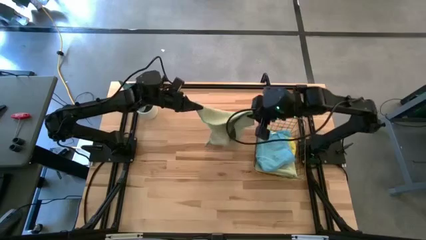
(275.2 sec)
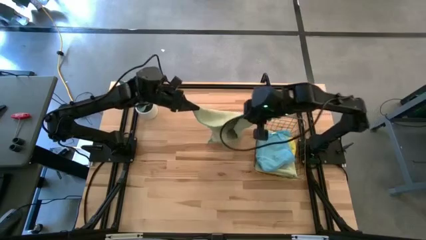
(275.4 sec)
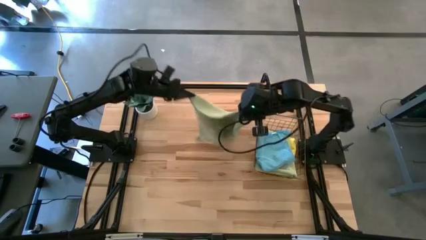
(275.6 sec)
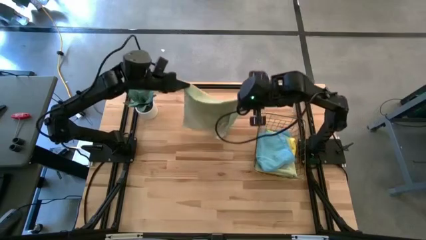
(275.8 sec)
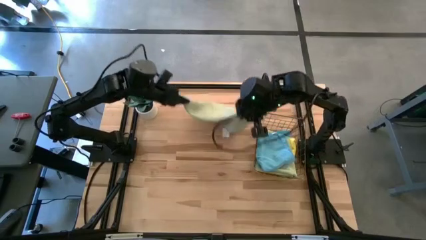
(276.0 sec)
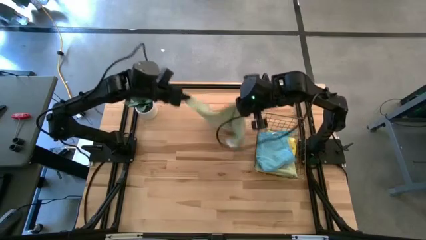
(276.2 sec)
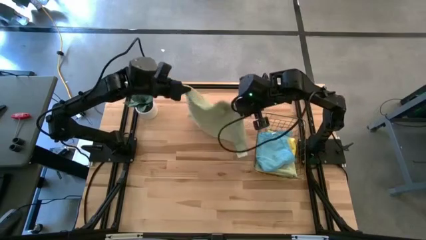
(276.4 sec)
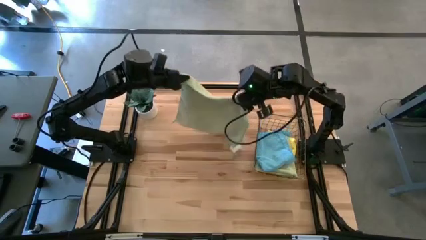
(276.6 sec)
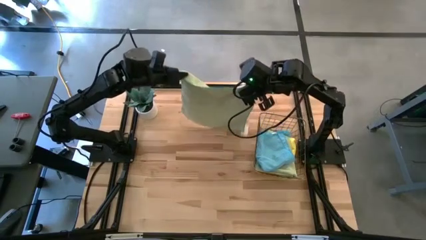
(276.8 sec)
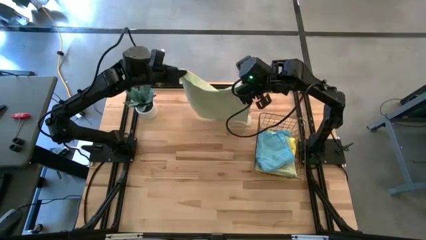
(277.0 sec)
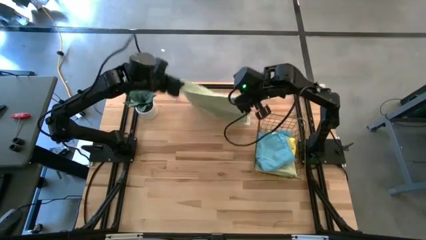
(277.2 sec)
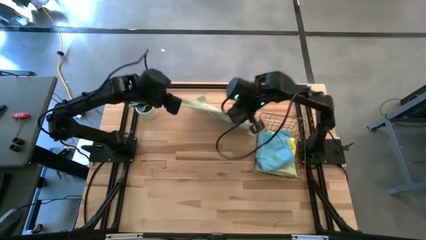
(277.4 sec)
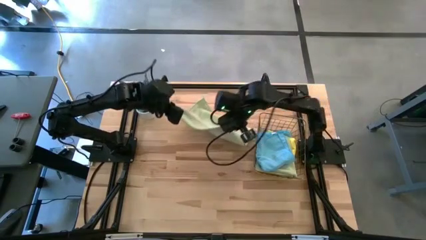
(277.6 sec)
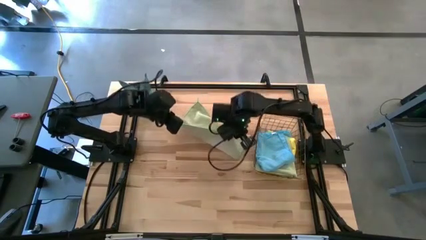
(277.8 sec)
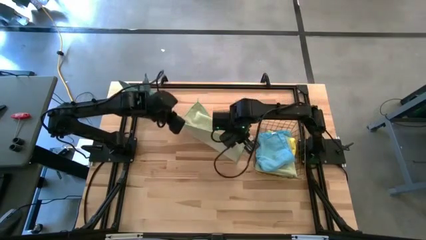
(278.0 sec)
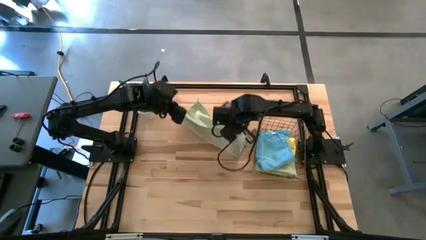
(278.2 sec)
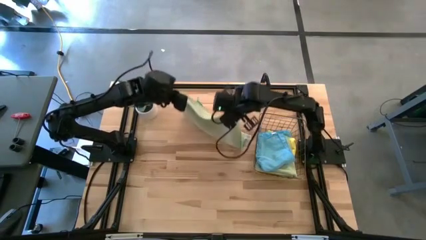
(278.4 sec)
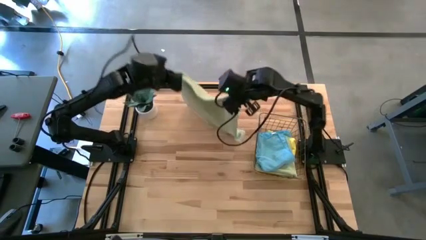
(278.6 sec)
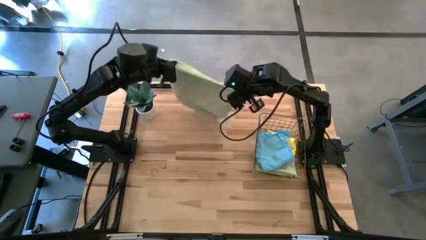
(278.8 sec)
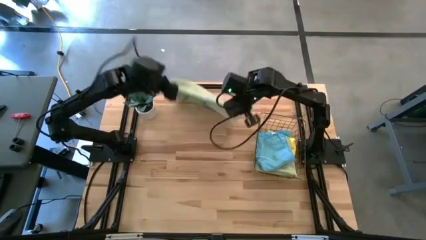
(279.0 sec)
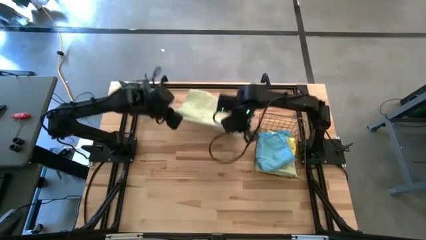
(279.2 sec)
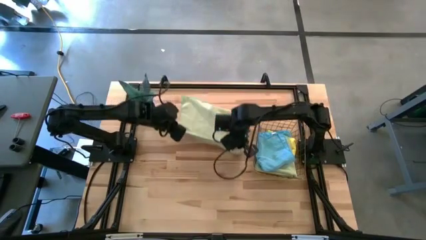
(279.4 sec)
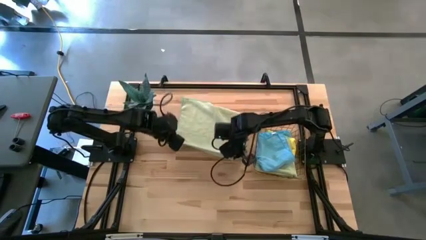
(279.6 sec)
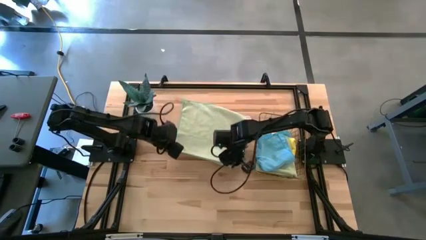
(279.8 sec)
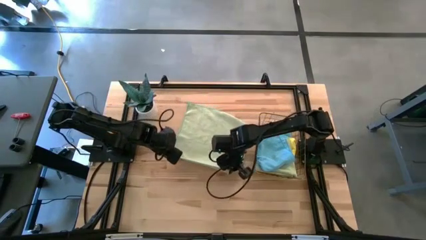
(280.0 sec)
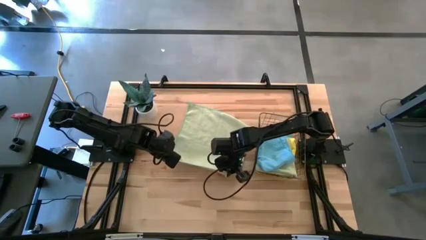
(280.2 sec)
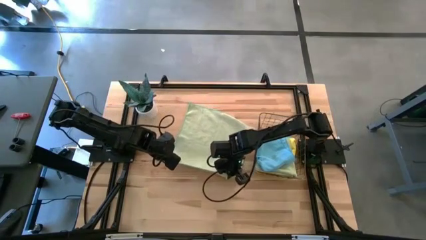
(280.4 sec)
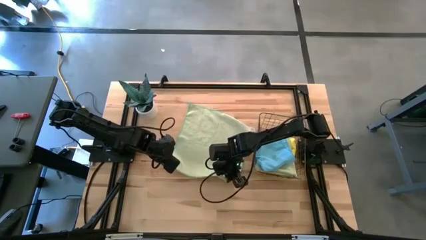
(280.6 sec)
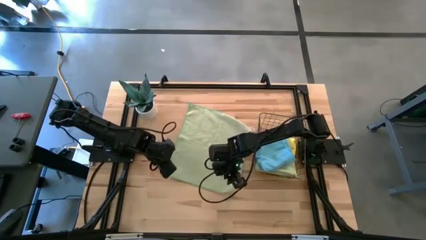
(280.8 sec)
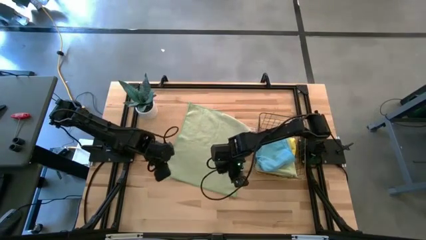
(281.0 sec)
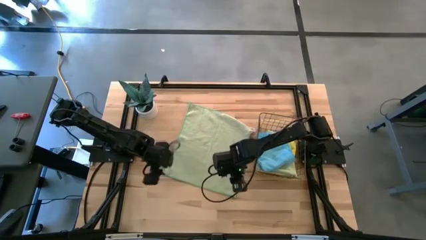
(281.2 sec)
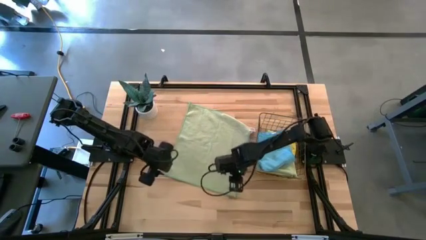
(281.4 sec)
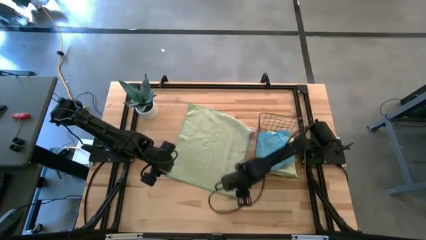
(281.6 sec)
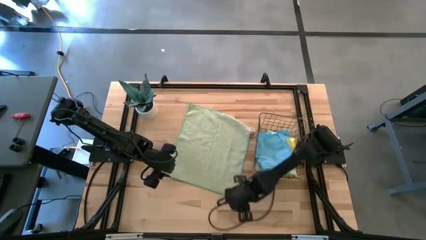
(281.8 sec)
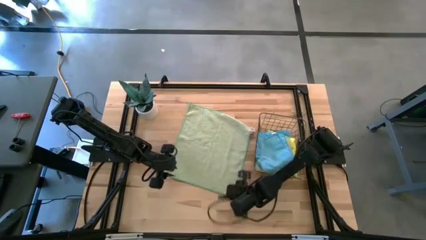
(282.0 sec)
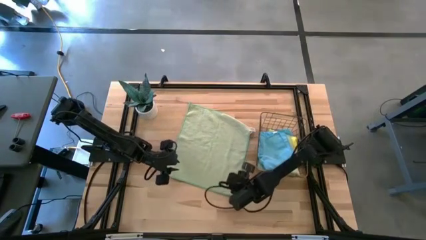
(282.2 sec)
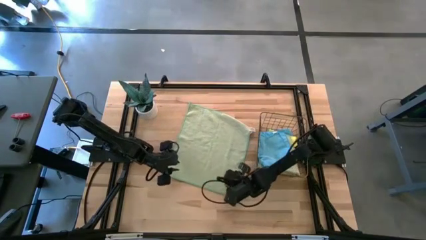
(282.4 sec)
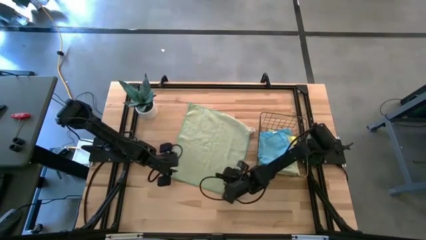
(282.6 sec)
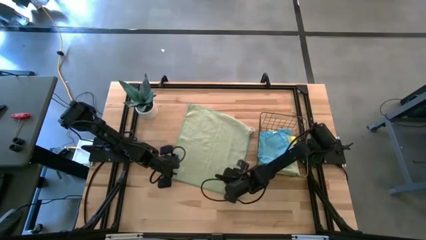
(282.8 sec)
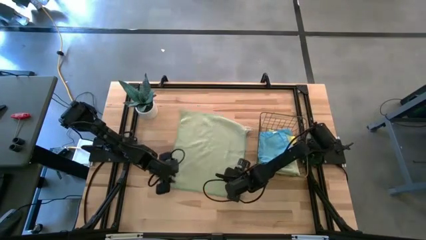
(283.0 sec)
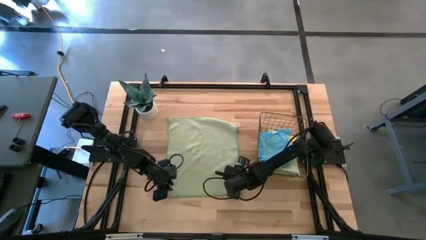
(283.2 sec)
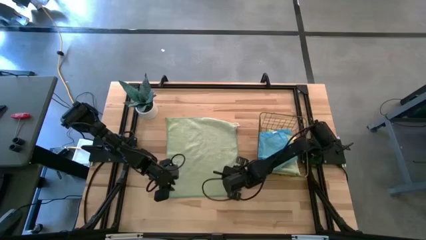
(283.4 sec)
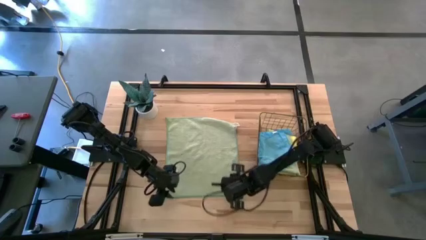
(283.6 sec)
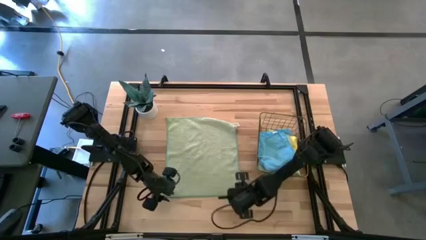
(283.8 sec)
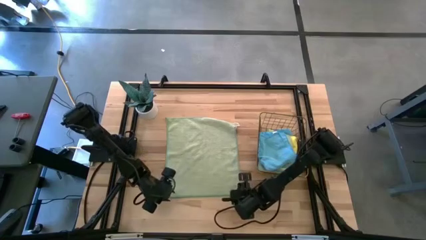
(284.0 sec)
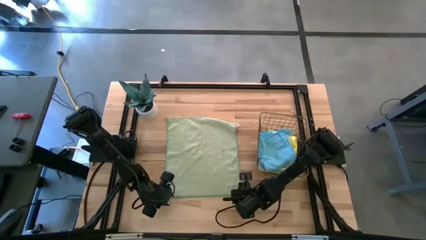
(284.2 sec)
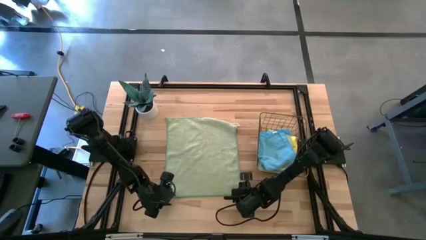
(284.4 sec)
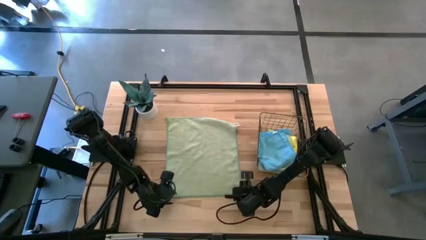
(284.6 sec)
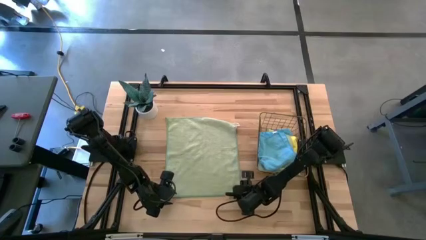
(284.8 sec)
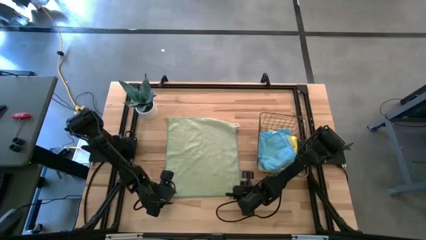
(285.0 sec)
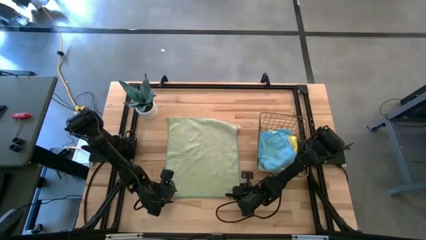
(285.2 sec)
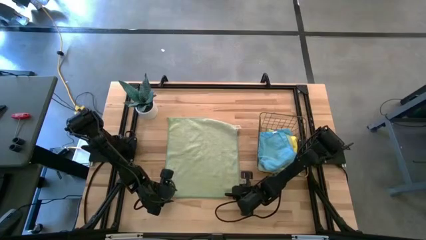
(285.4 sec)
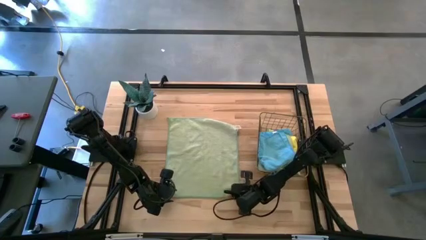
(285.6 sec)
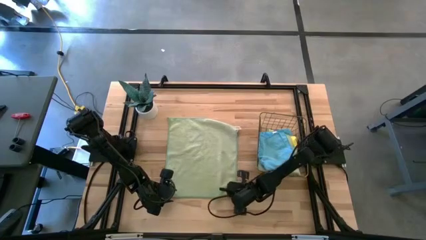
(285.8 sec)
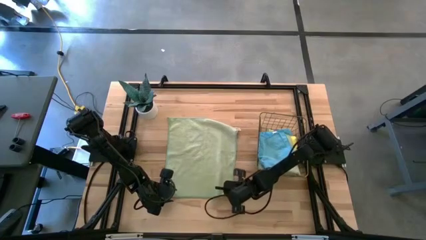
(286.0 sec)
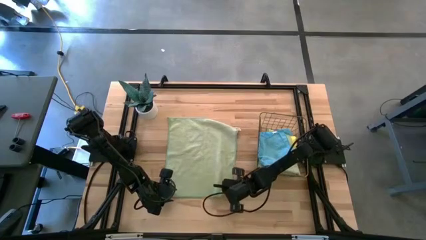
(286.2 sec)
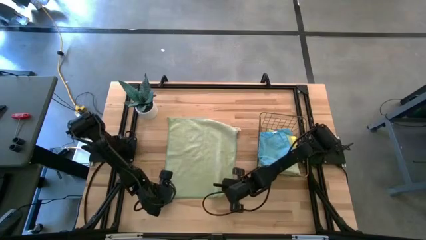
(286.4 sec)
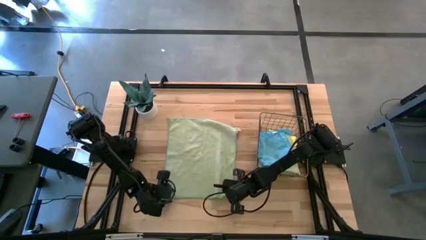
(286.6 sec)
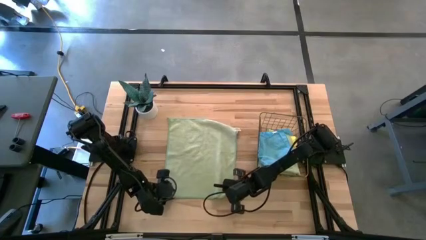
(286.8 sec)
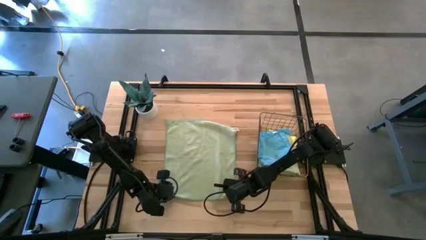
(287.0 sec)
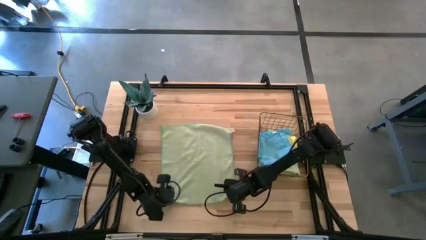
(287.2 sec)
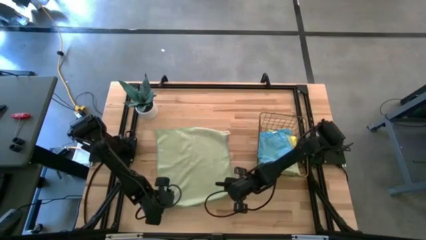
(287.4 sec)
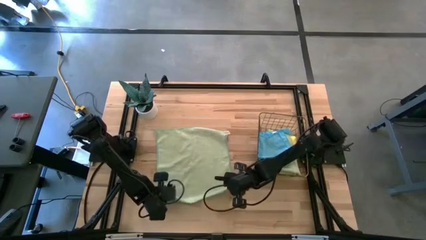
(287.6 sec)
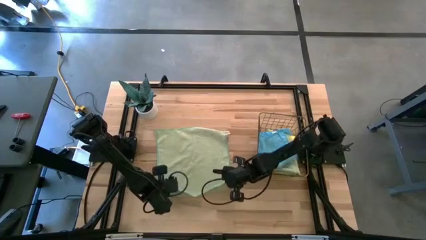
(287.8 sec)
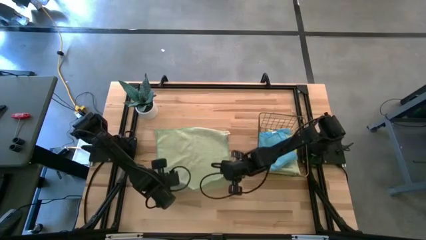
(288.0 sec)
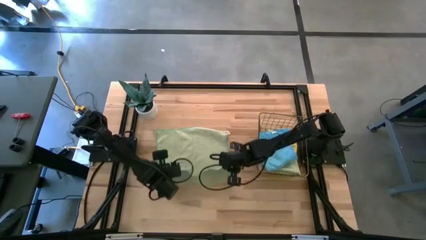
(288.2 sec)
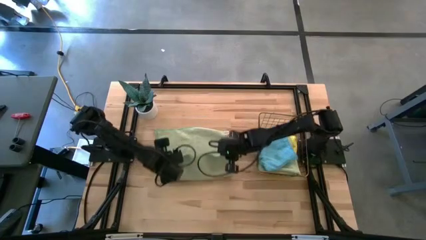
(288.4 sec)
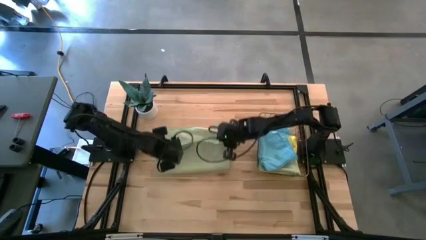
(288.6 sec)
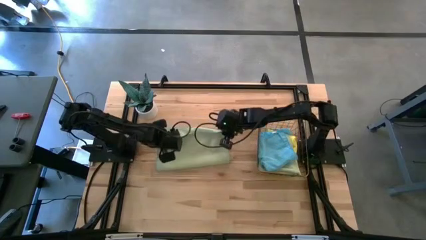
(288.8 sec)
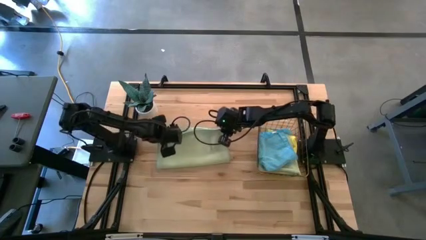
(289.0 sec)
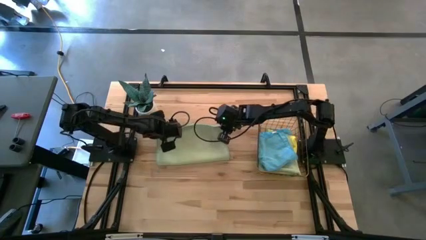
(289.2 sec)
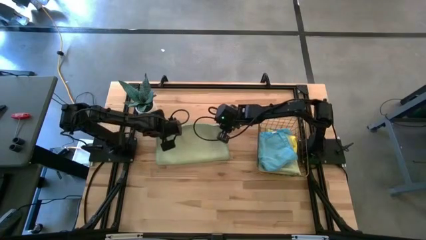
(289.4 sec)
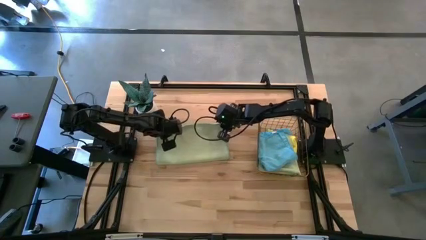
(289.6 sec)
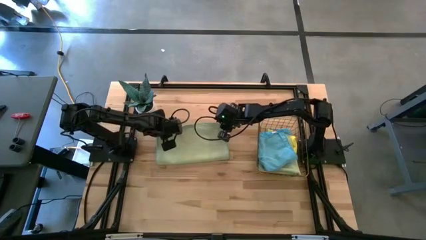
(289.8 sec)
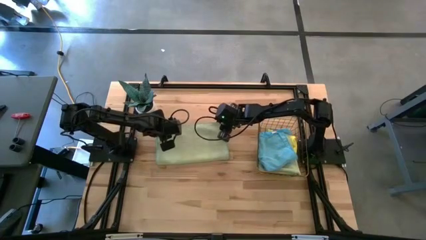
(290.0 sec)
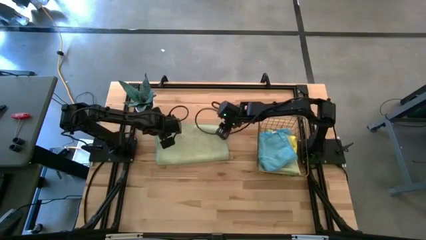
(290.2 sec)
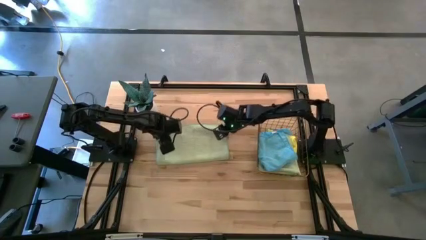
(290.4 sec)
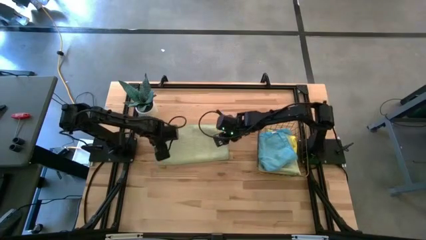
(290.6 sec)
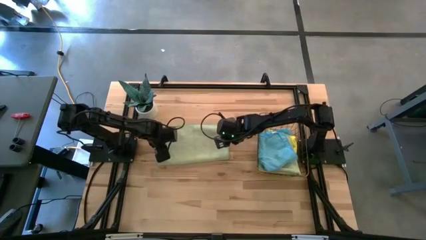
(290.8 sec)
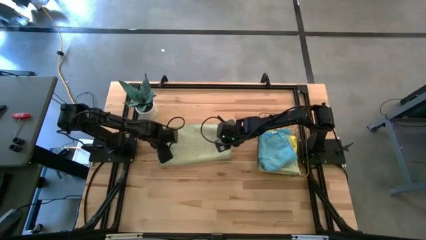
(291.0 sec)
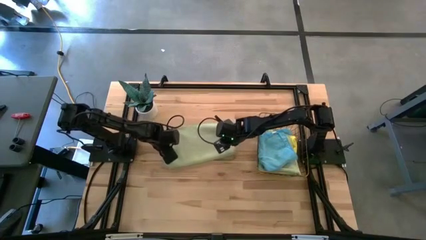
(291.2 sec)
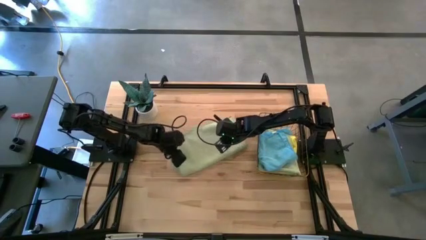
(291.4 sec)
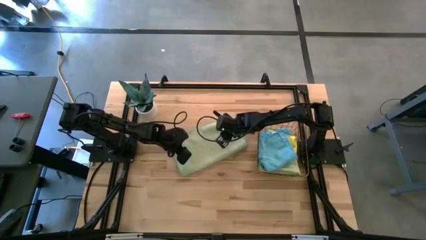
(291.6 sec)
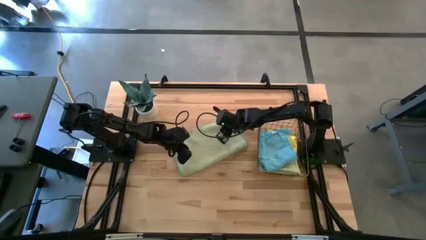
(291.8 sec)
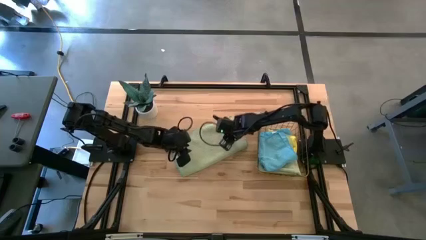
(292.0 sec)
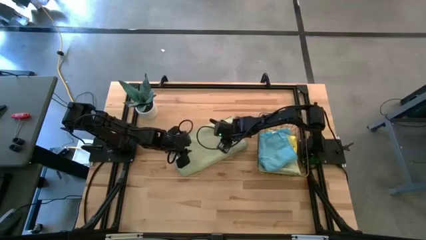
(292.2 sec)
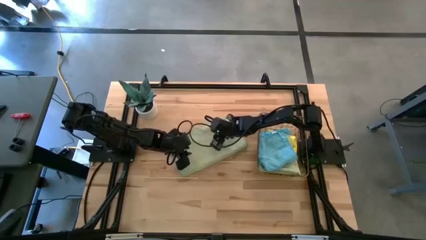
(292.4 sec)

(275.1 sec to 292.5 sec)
Task: Fold microfiber towels
Fold the green microfiber cloth
